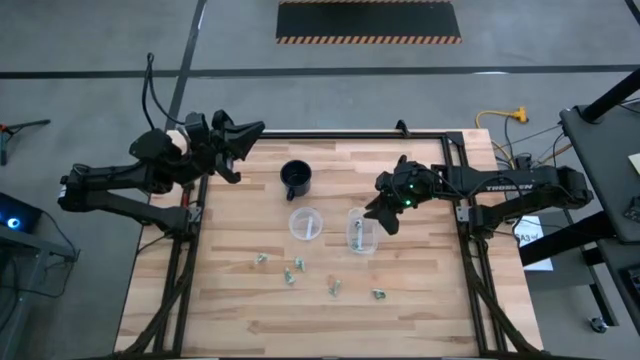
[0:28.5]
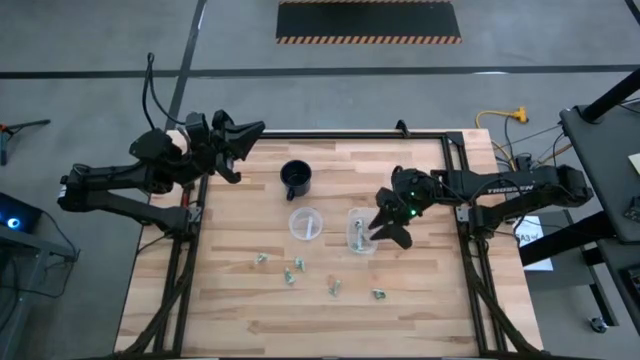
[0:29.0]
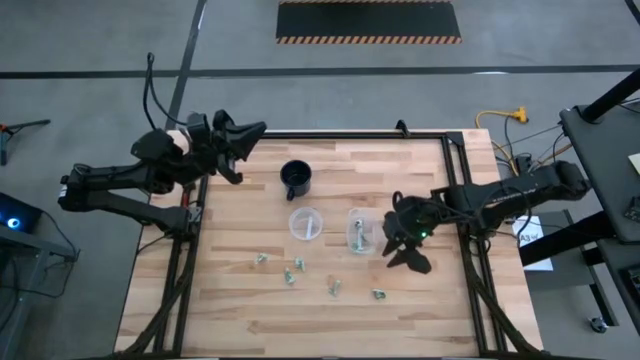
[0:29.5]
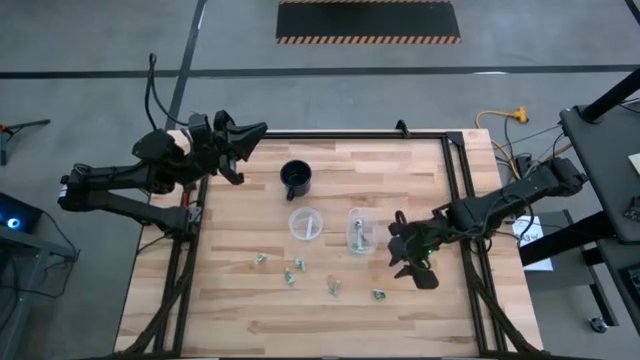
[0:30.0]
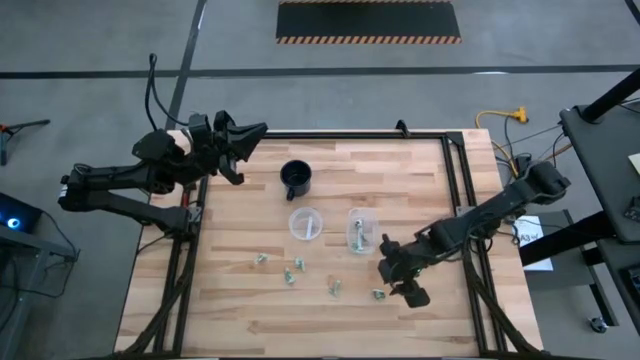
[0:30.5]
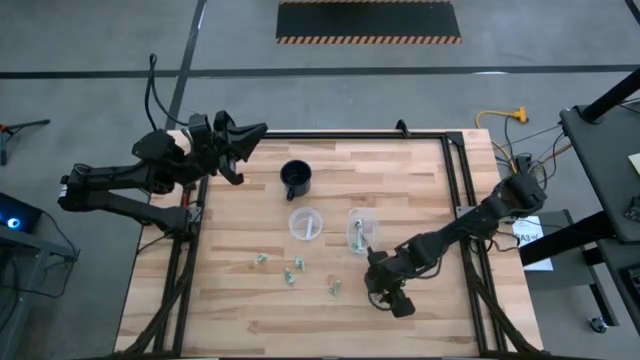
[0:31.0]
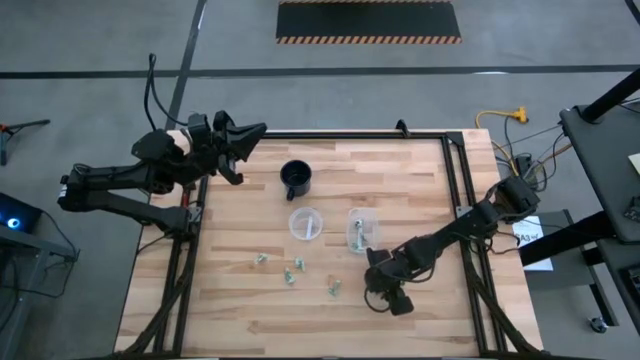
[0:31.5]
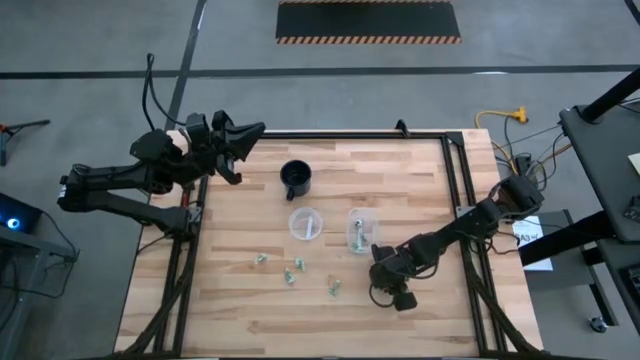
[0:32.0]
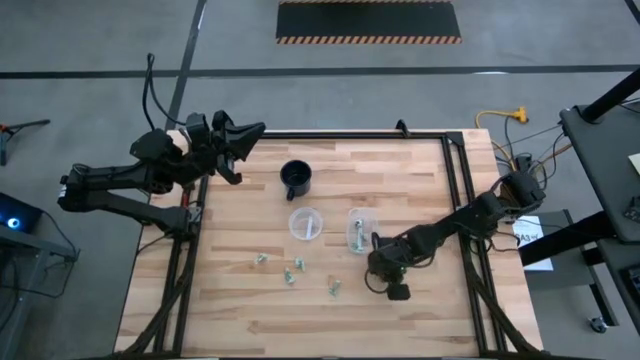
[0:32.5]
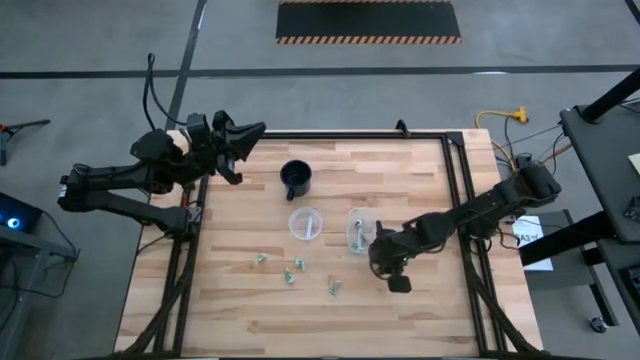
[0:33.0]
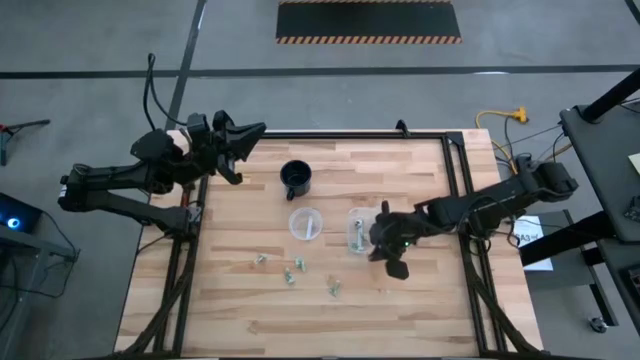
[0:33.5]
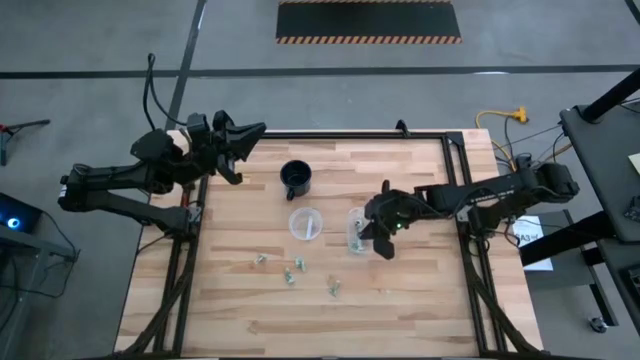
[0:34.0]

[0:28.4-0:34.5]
Task: Pick and place Stevia / Truvia into bins
Put the truvia packet into the oval transparent container

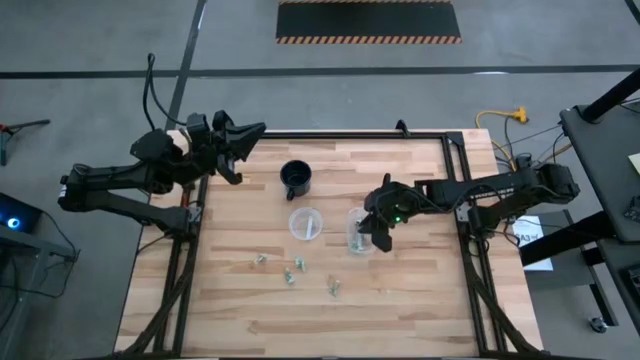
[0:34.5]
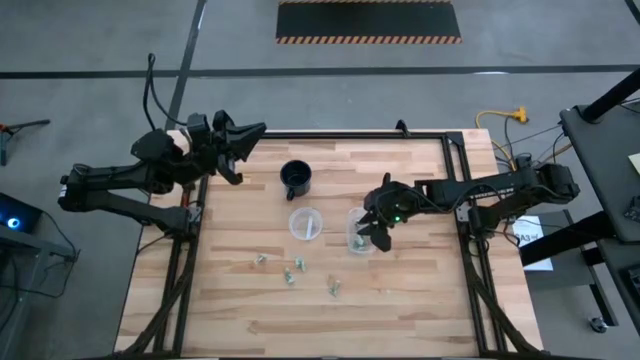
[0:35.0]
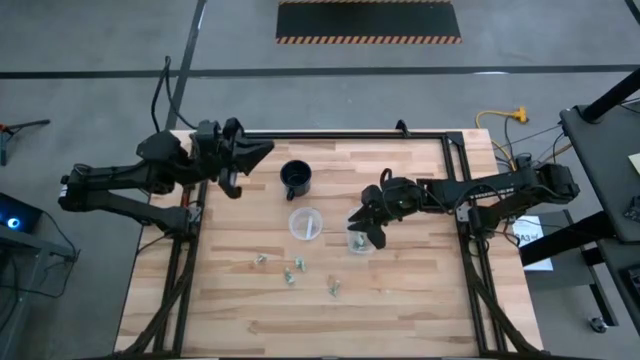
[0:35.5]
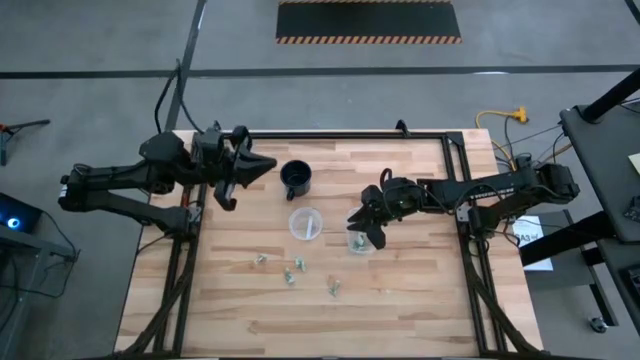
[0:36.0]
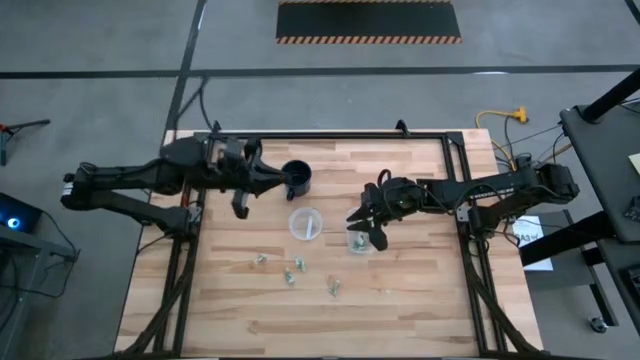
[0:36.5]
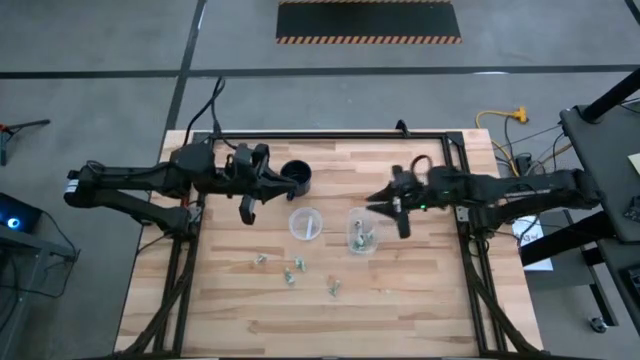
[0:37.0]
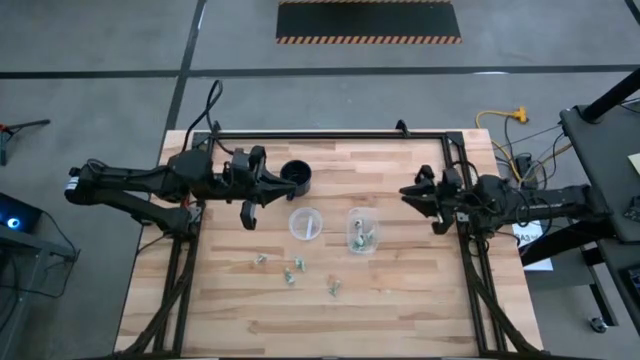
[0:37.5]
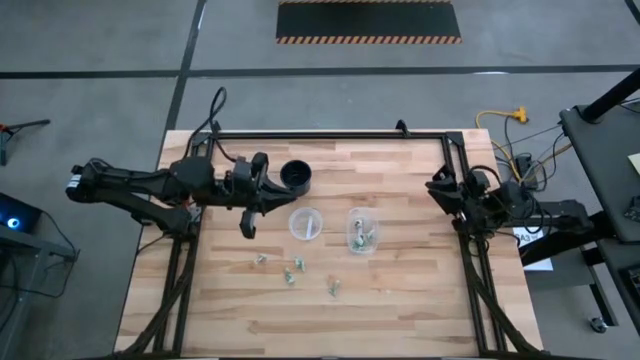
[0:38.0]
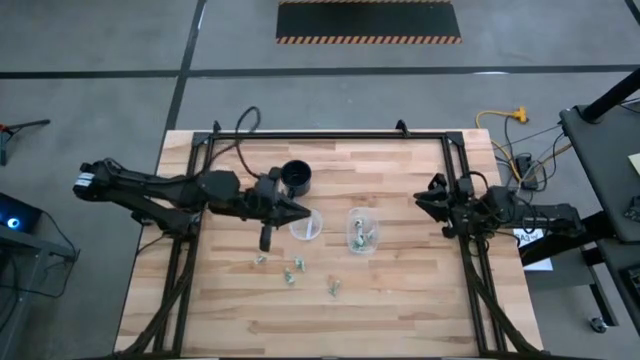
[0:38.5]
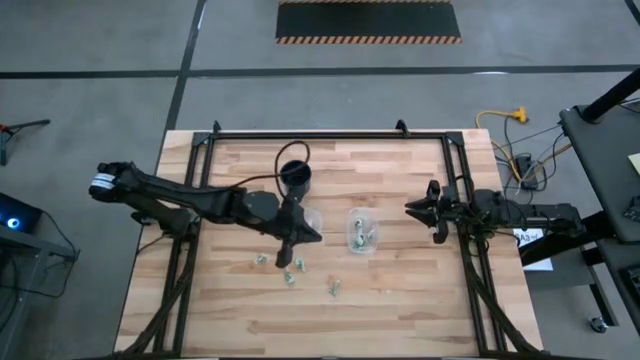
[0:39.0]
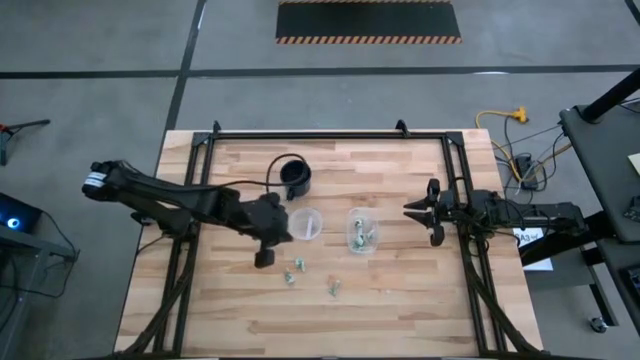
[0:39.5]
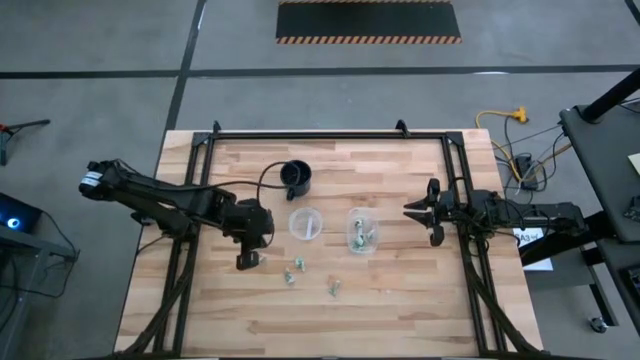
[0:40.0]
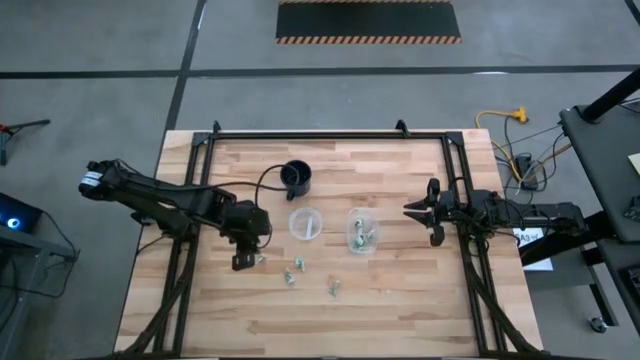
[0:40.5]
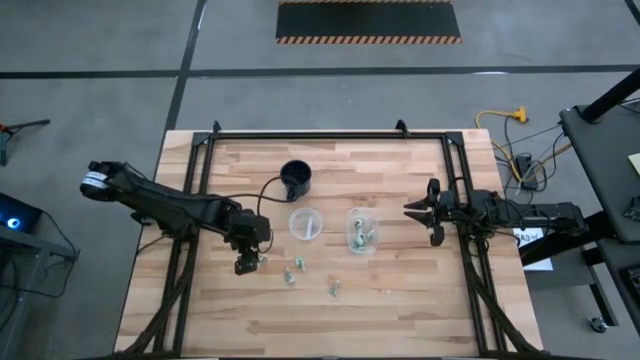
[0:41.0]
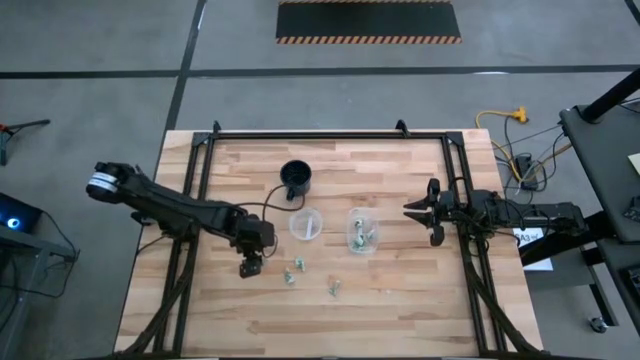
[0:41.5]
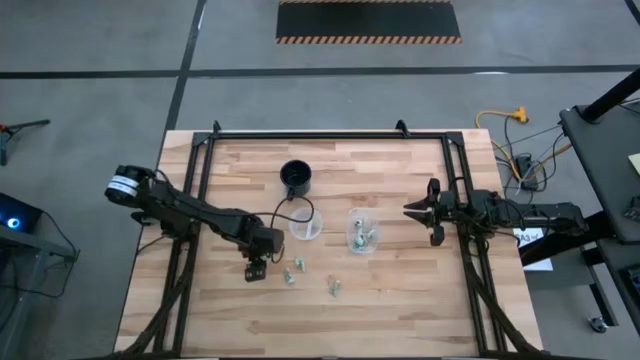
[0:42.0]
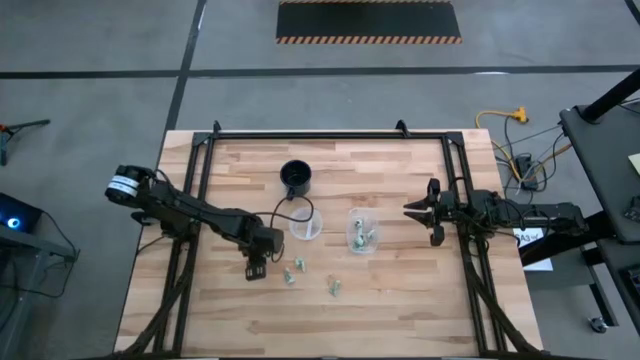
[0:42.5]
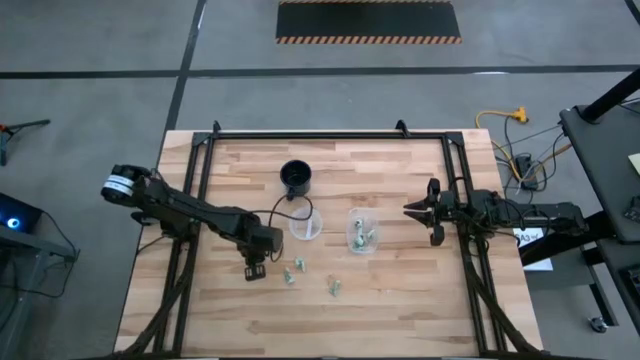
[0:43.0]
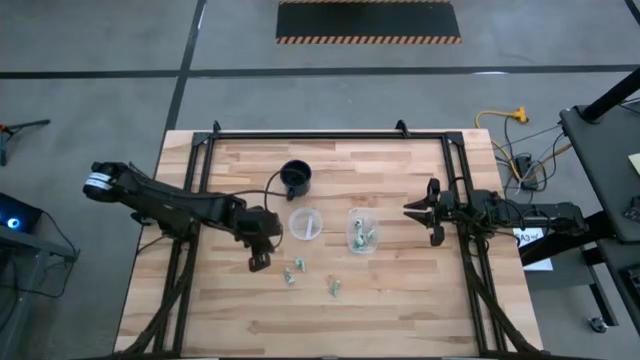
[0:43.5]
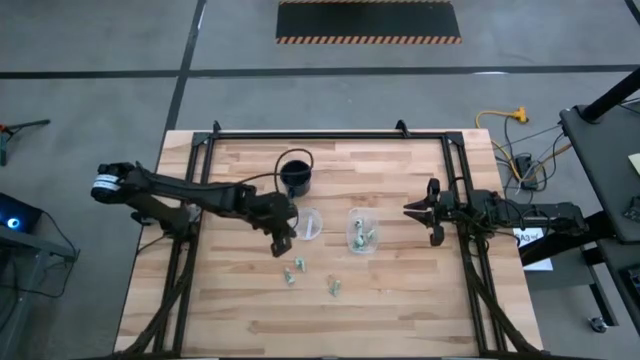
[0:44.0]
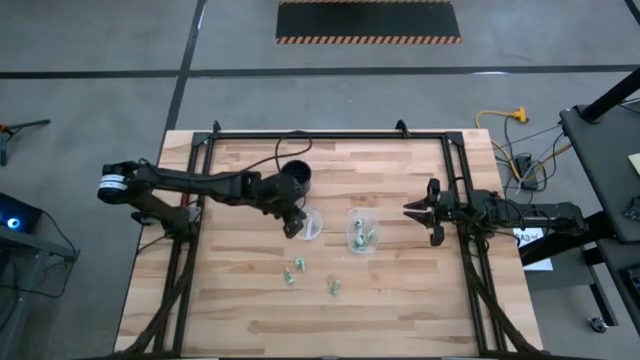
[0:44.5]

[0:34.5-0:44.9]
Put the stevia packet into the round transparent container

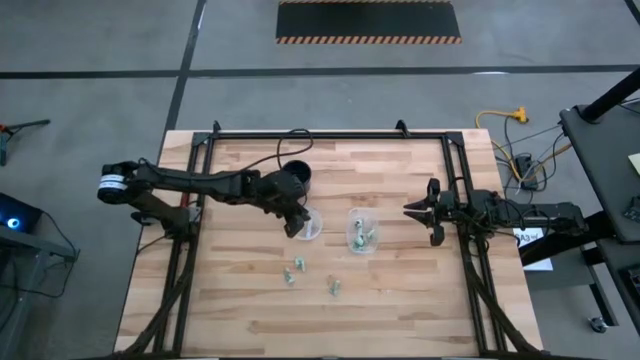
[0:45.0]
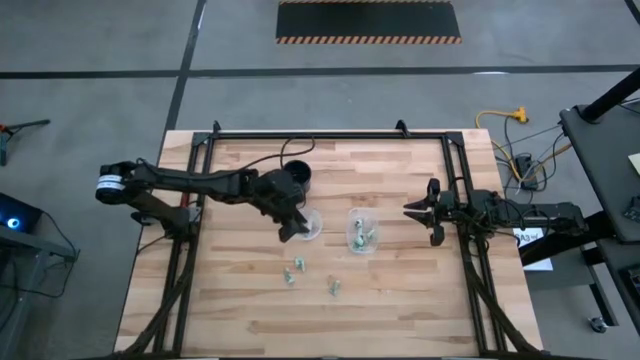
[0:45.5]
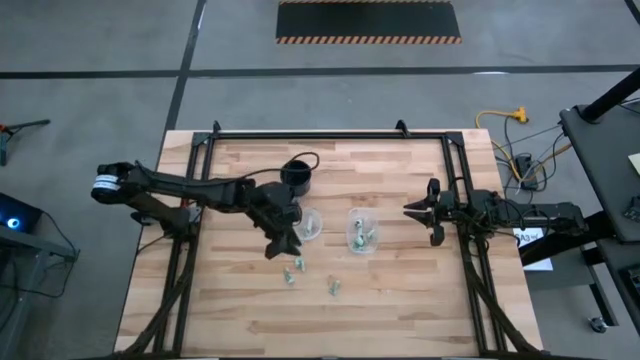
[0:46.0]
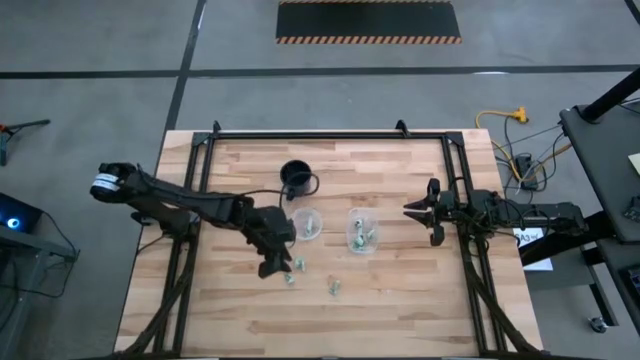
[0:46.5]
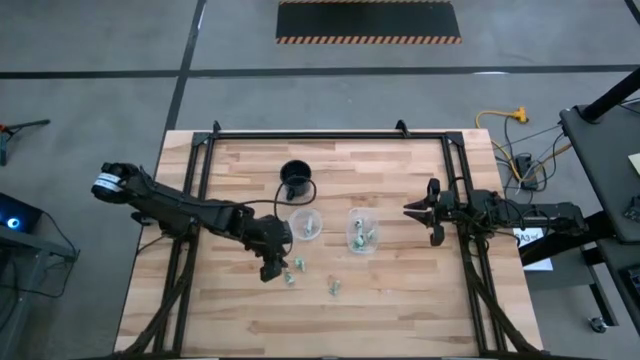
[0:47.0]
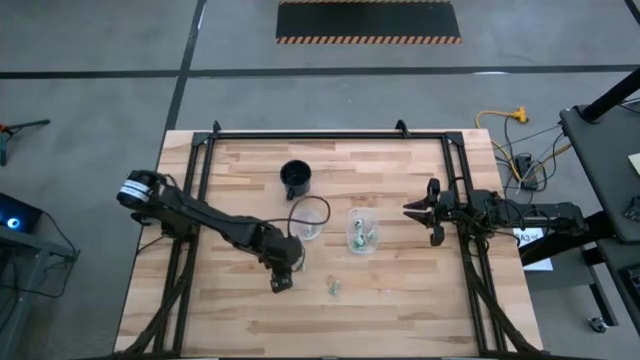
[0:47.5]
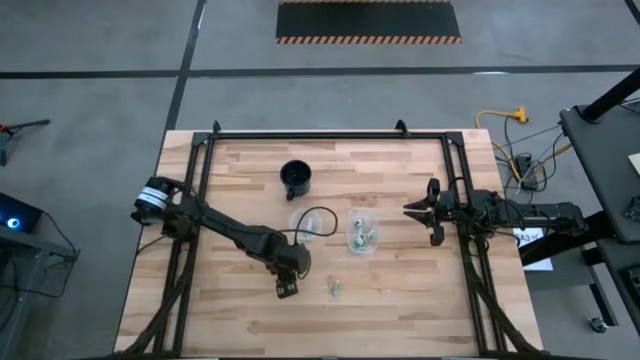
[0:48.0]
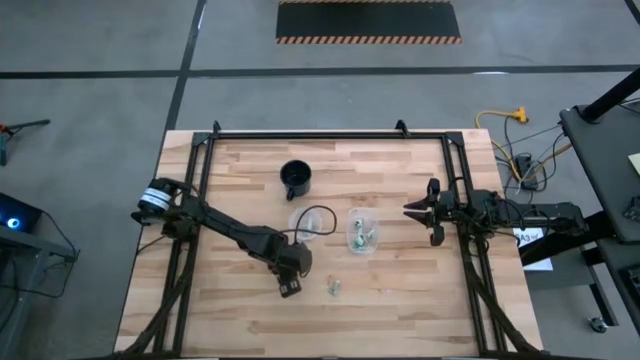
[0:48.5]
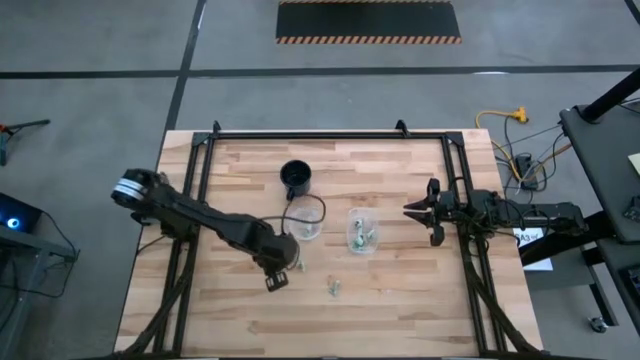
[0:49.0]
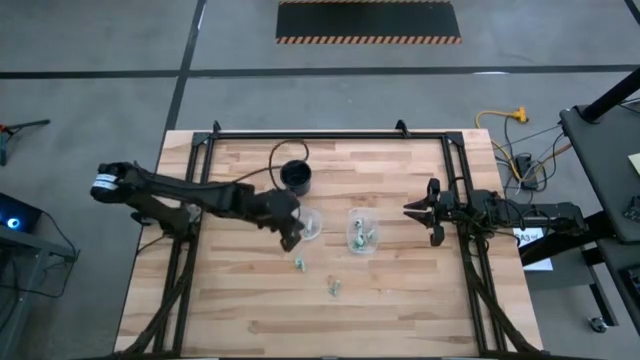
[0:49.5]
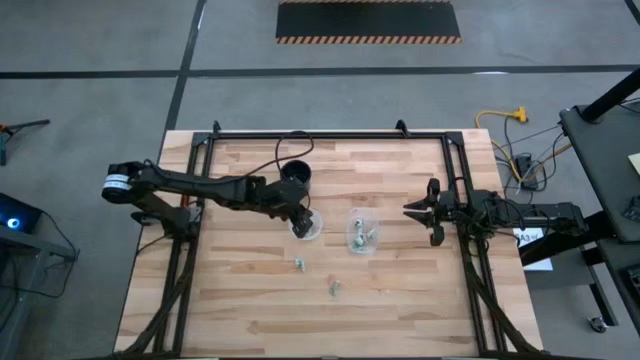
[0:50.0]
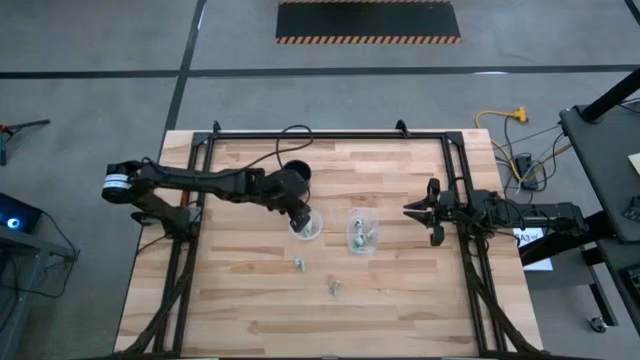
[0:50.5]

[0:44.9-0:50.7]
Put the stevia packet into the round transparent container
